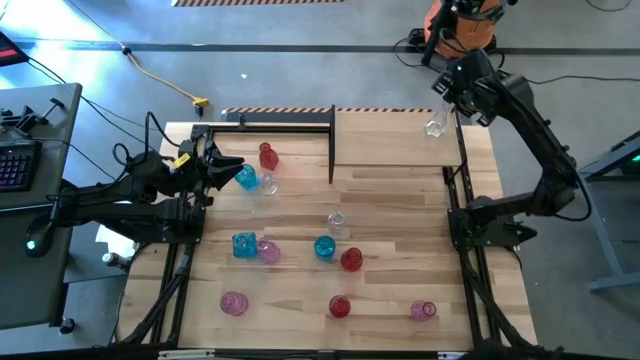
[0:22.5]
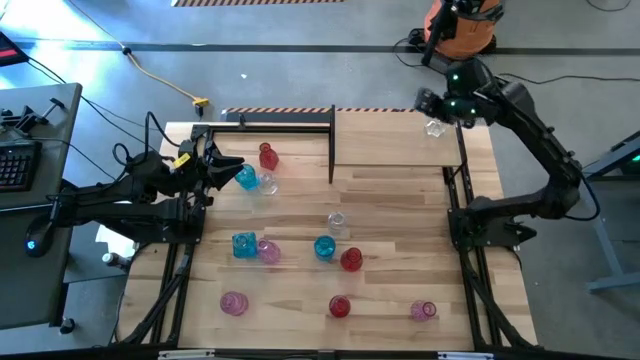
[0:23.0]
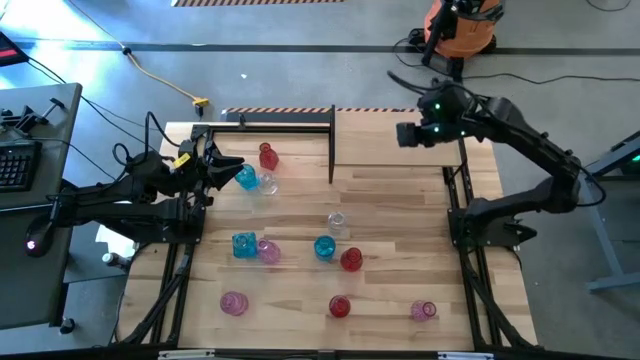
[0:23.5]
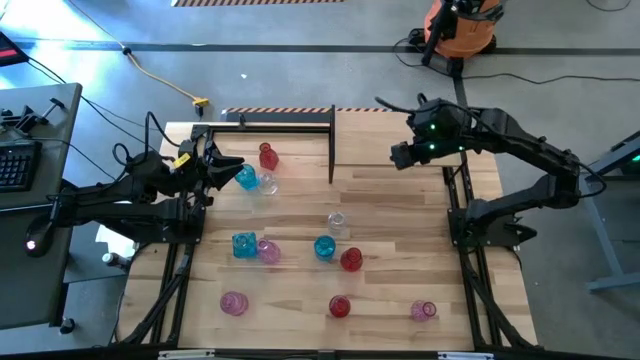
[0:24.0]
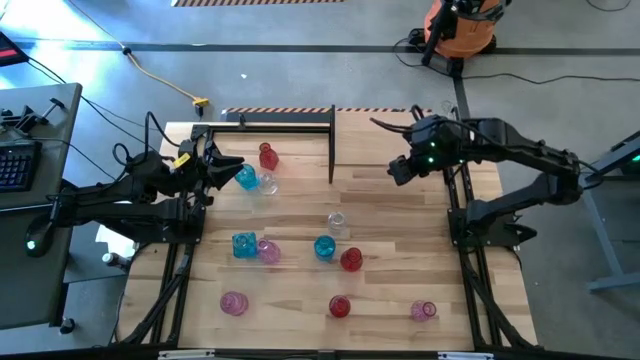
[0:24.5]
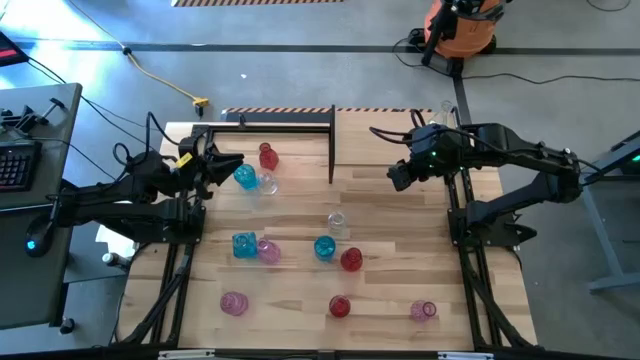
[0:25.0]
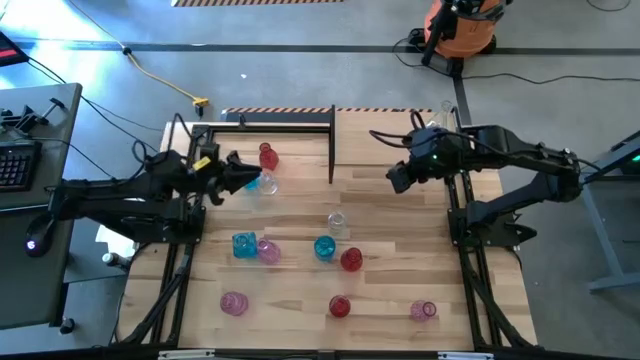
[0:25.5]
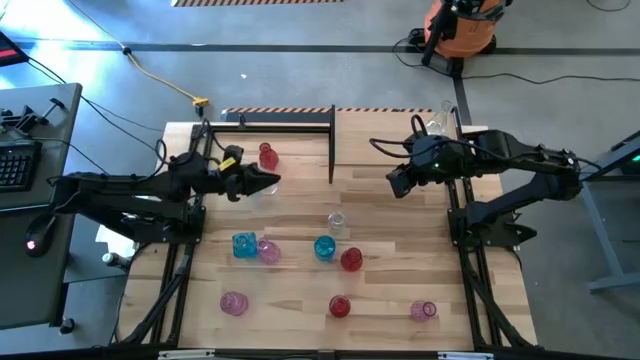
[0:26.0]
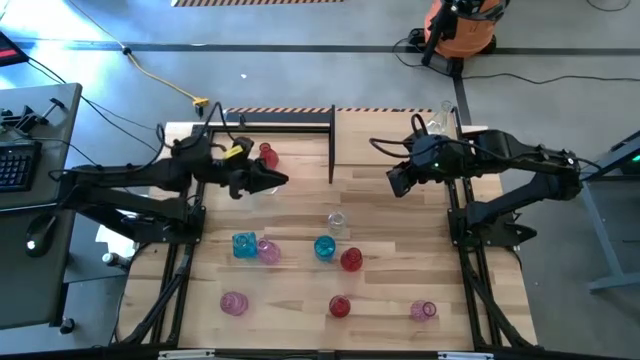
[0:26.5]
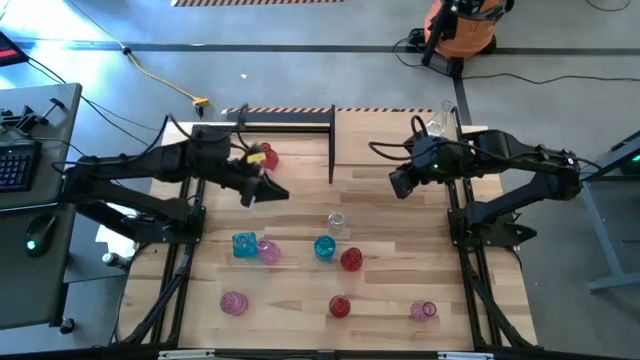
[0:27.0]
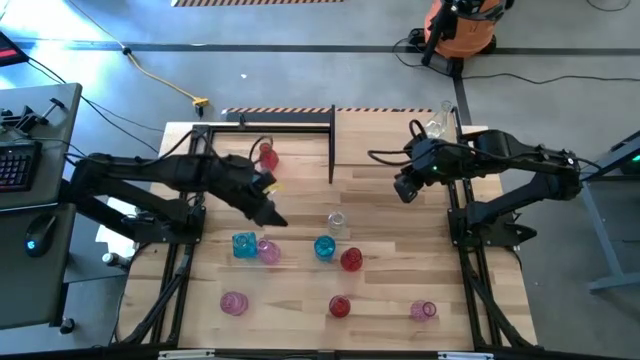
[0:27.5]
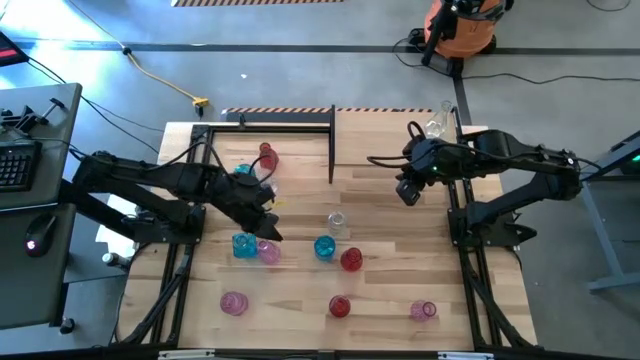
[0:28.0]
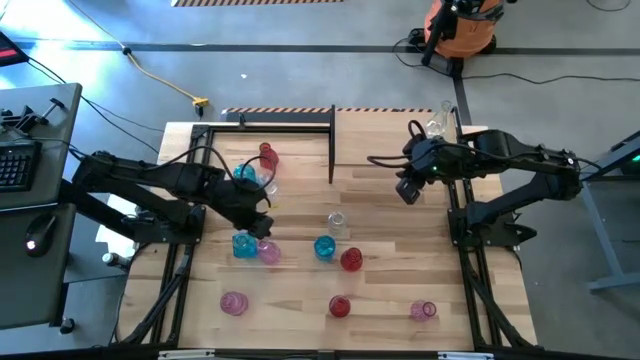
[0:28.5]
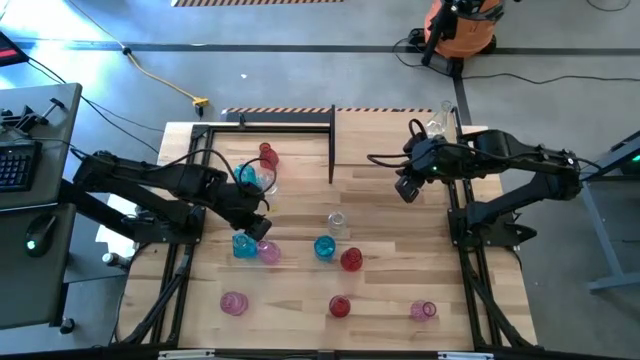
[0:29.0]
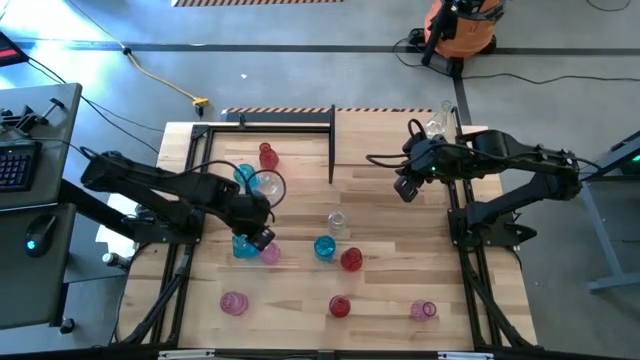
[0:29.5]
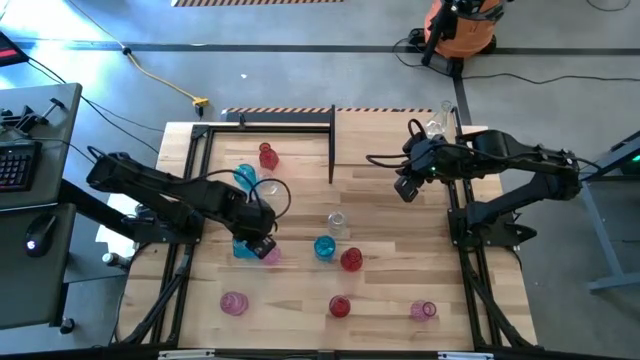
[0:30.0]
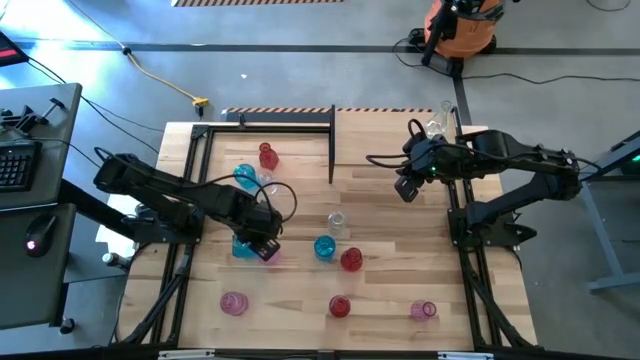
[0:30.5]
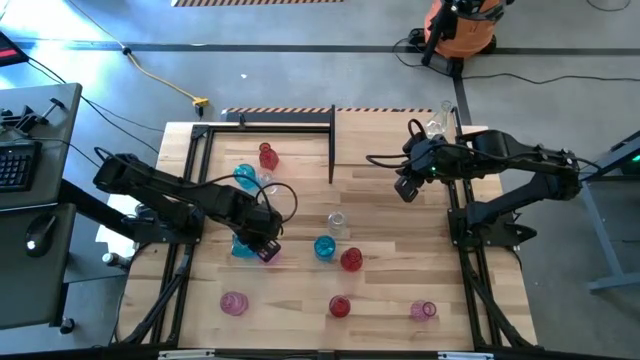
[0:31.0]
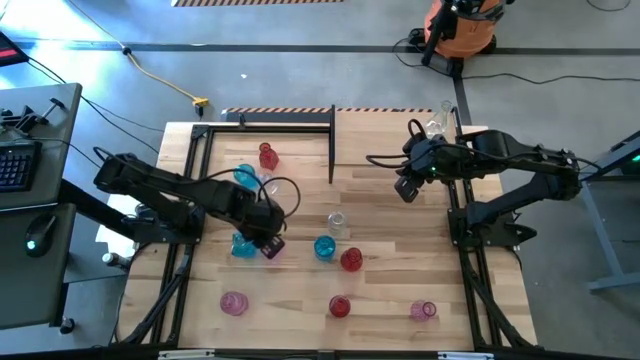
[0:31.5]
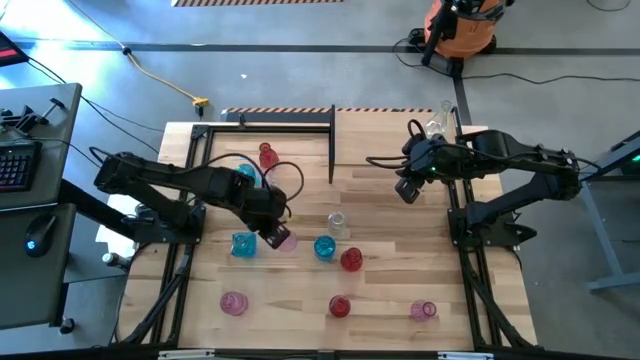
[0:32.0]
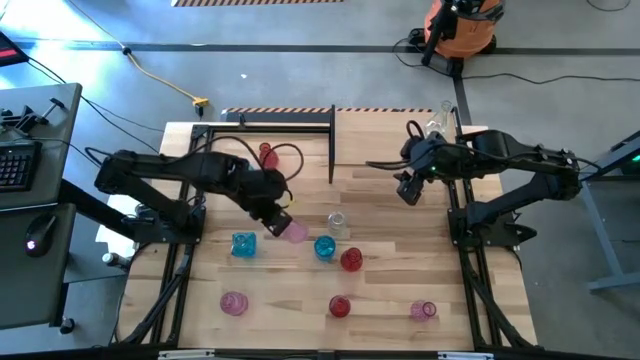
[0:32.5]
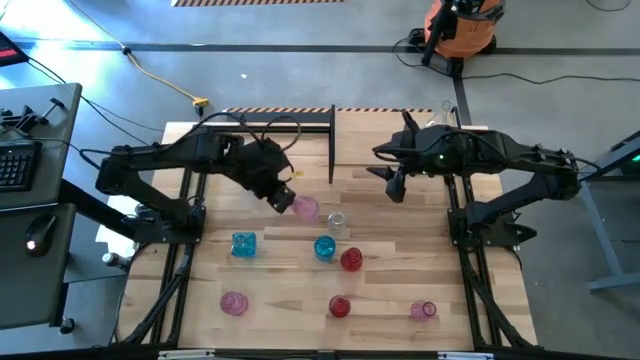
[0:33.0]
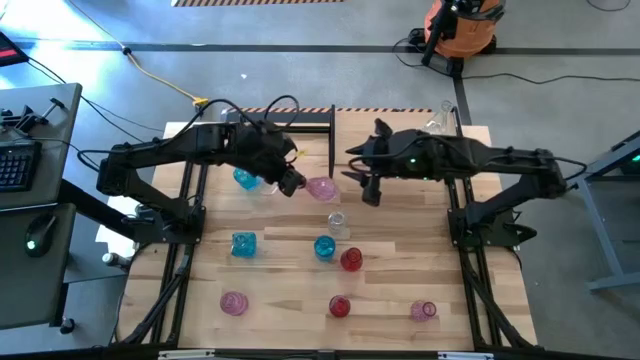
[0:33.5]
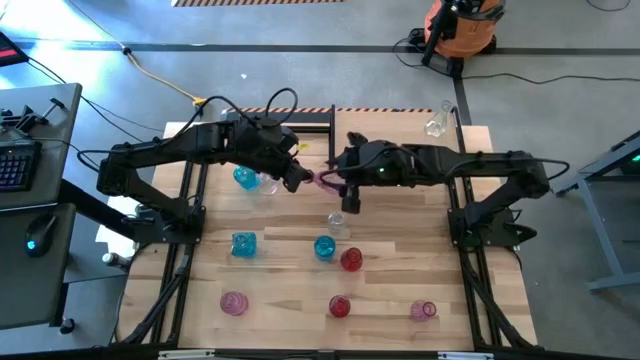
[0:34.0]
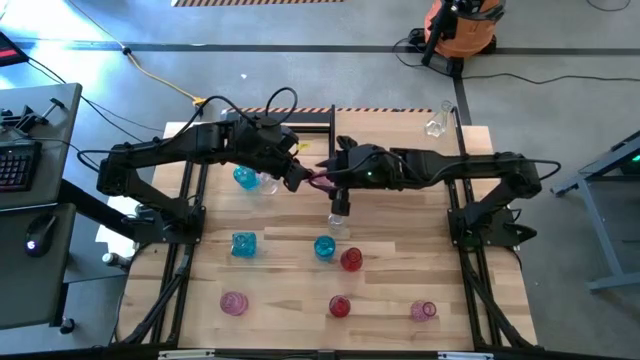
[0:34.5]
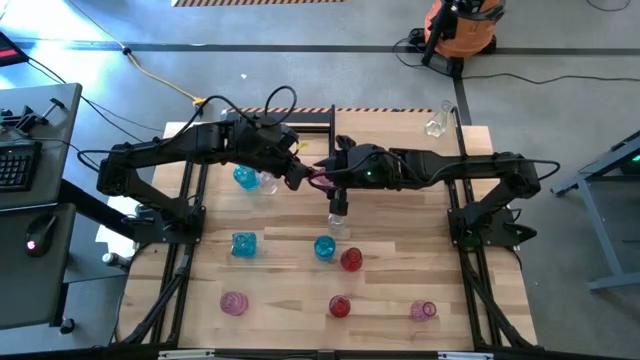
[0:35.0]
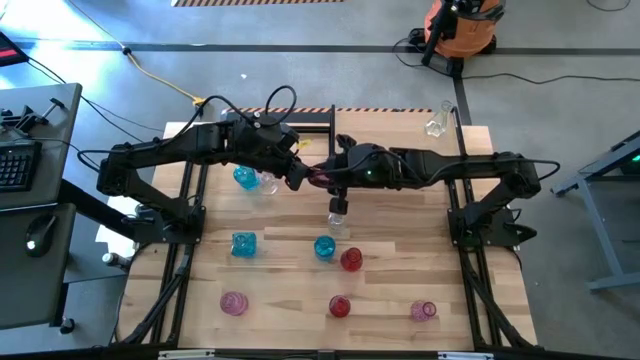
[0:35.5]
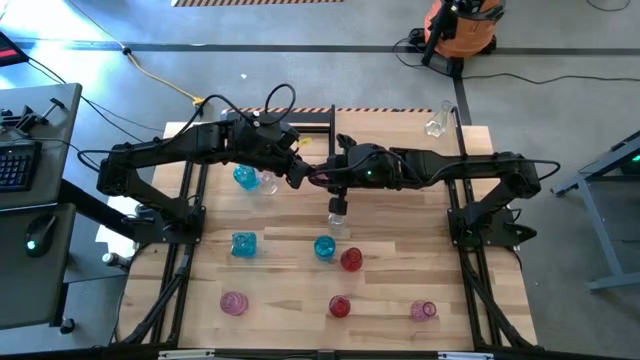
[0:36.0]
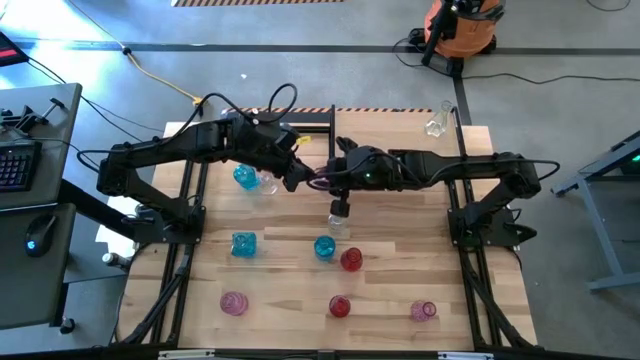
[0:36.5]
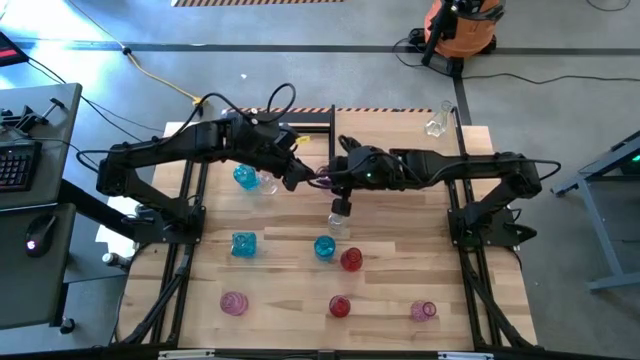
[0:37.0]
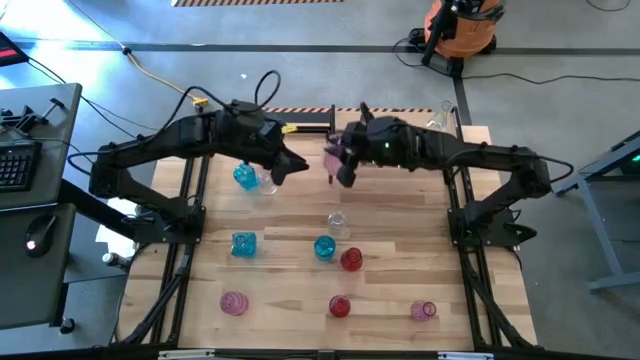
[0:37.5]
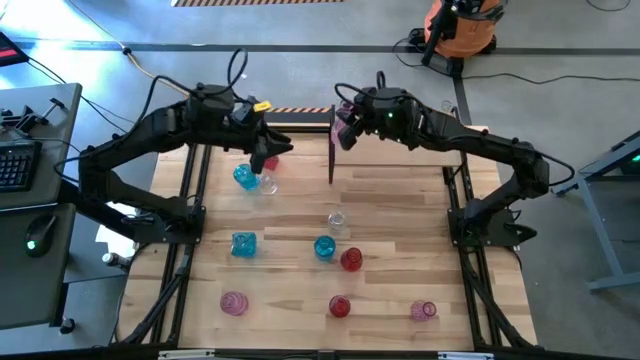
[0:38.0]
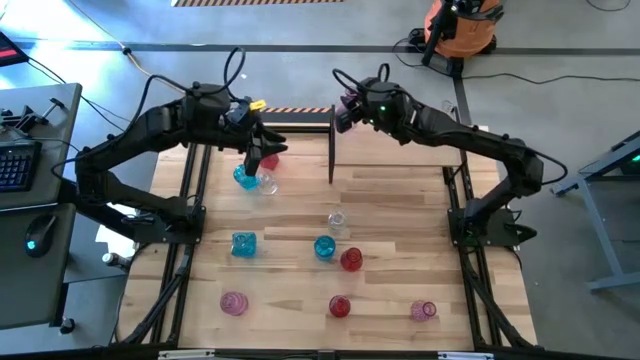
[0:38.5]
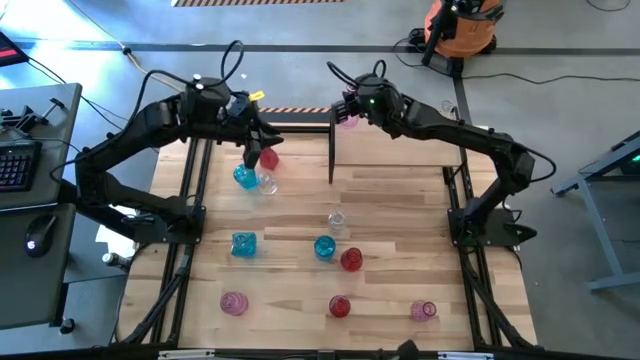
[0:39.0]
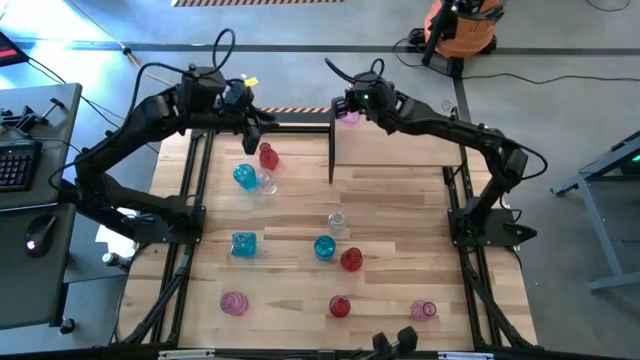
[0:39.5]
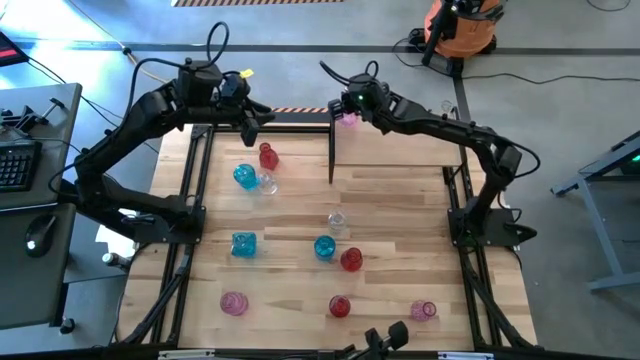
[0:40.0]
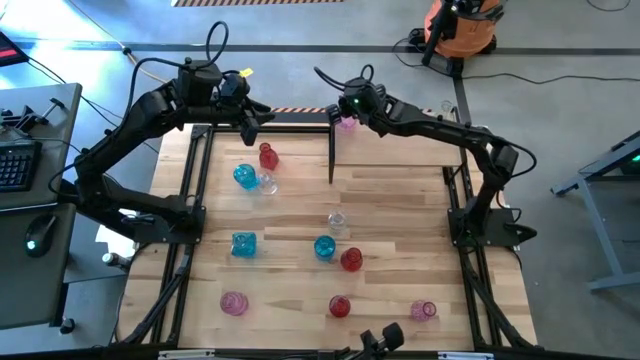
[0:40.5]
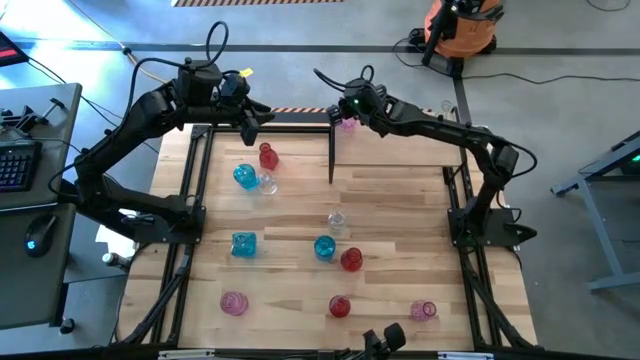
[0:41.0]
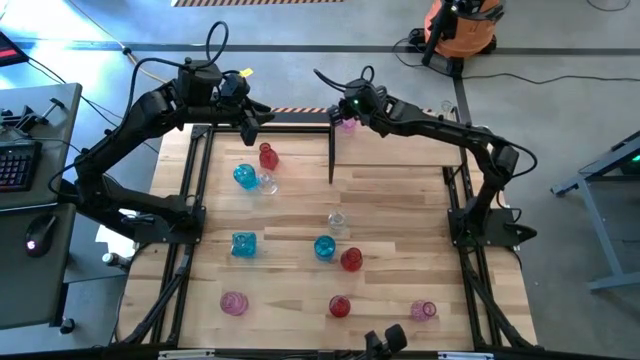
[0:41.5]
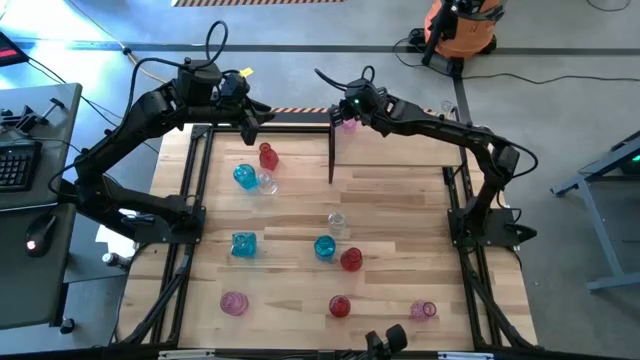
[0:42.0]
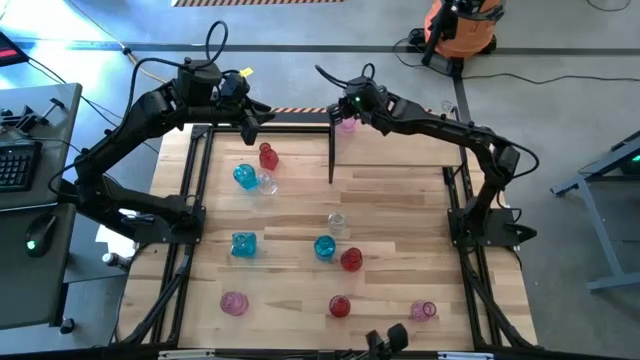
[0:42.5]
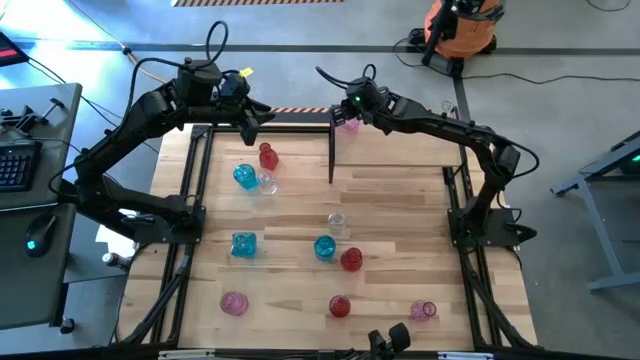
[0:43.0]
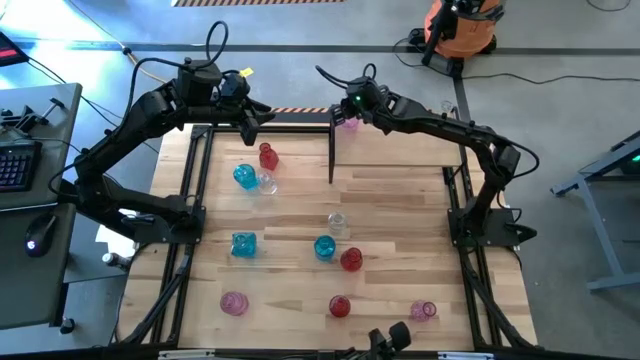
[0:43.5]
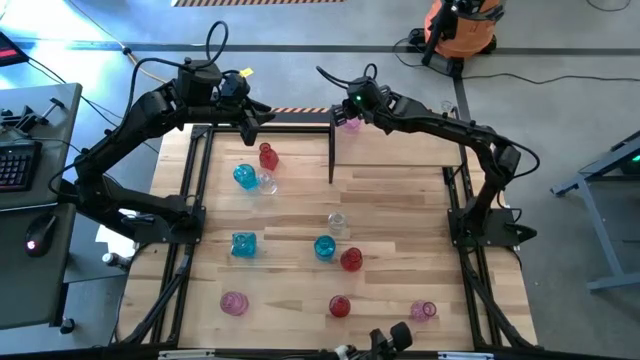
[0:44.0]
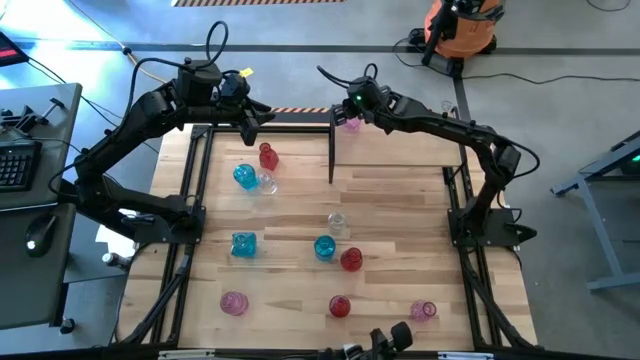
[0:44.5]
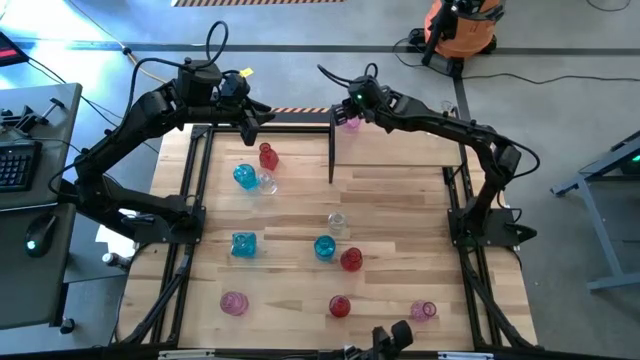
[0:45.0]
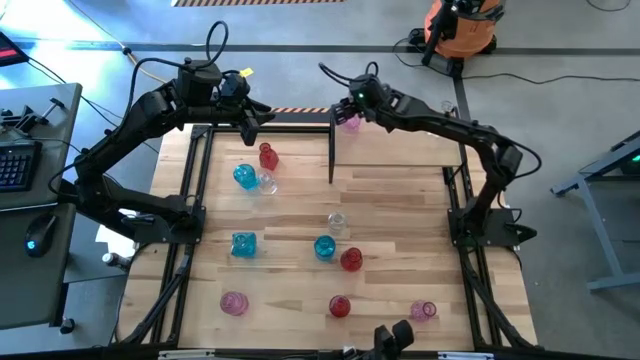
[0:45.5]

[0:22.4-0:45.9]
Task: sort vases onto shelf
Put the top pink vase on the shelf
